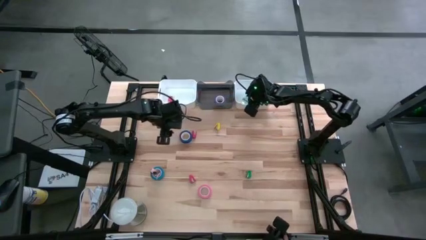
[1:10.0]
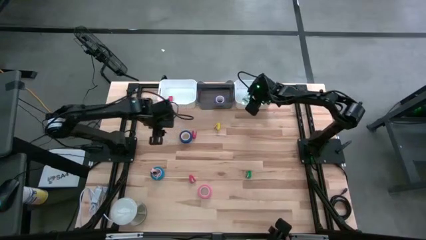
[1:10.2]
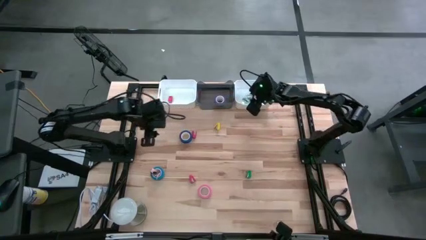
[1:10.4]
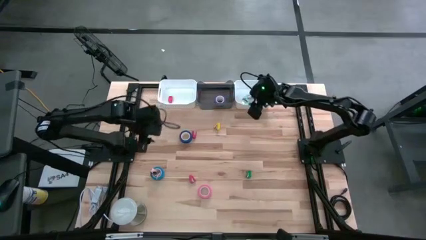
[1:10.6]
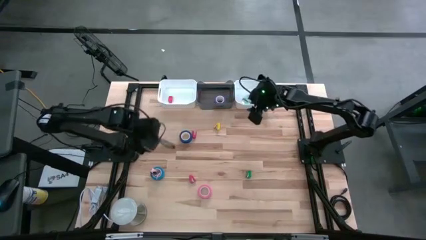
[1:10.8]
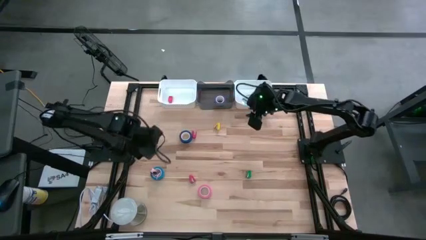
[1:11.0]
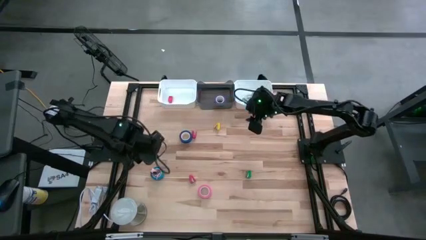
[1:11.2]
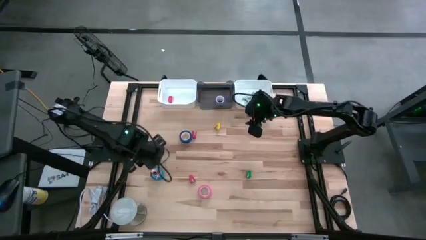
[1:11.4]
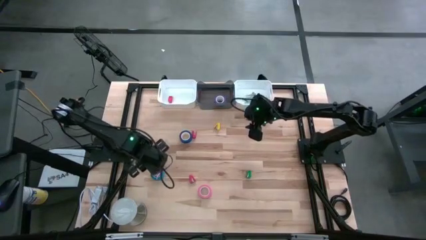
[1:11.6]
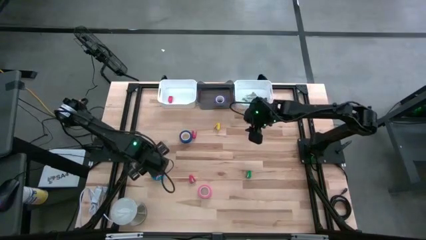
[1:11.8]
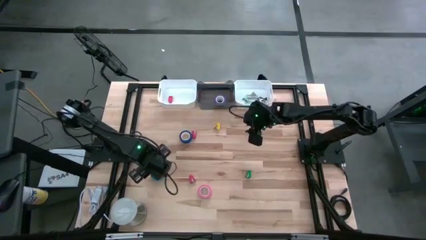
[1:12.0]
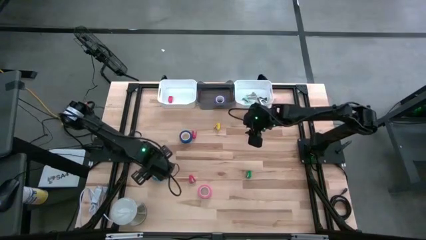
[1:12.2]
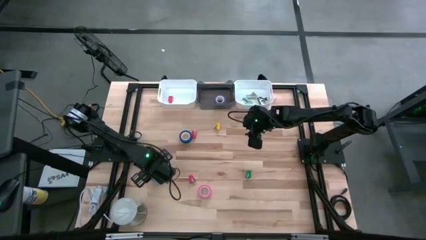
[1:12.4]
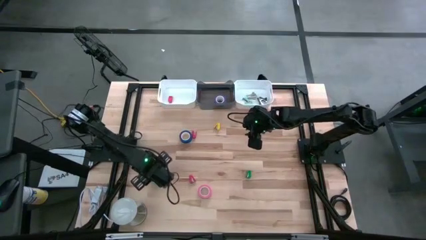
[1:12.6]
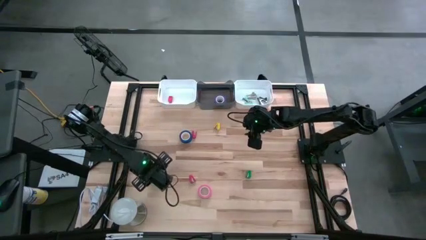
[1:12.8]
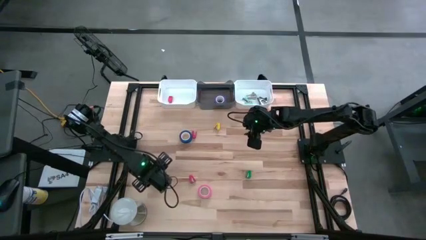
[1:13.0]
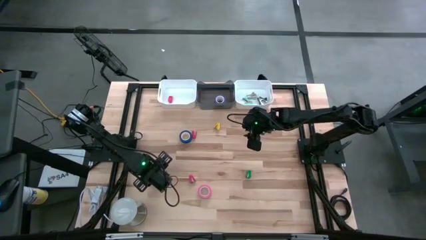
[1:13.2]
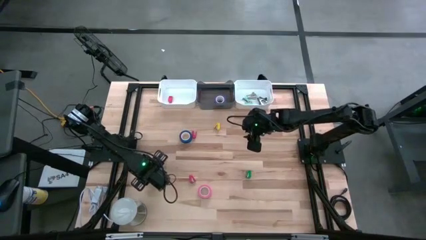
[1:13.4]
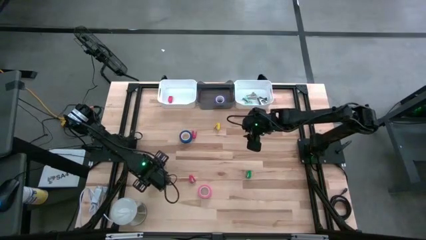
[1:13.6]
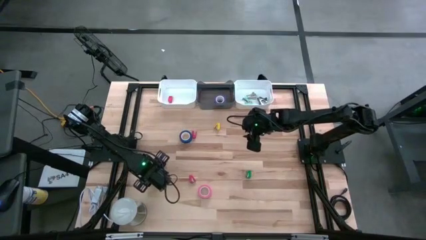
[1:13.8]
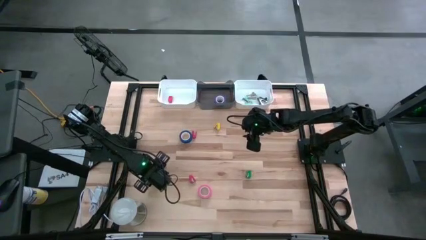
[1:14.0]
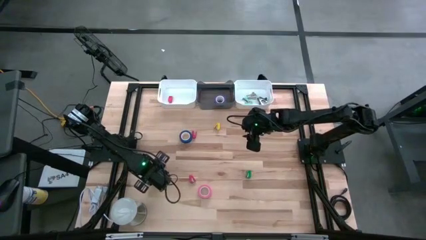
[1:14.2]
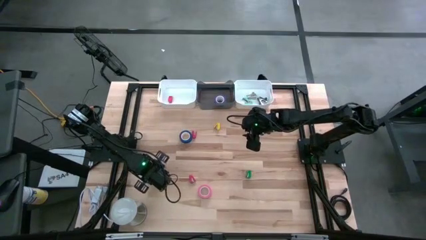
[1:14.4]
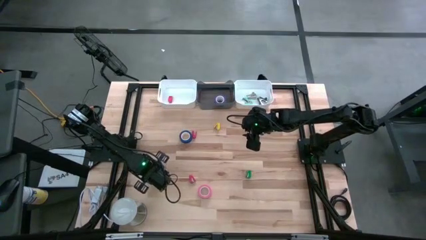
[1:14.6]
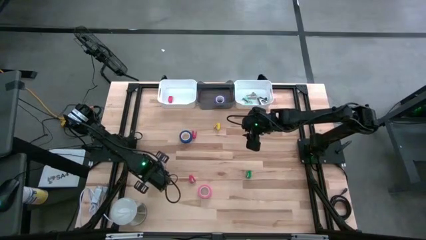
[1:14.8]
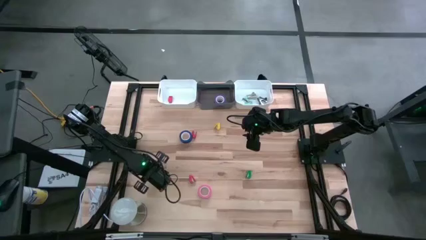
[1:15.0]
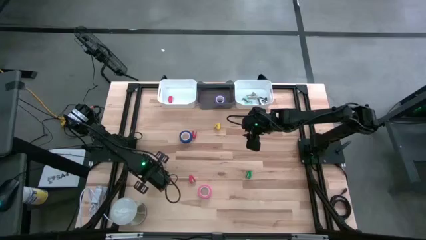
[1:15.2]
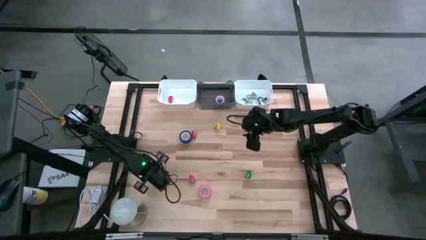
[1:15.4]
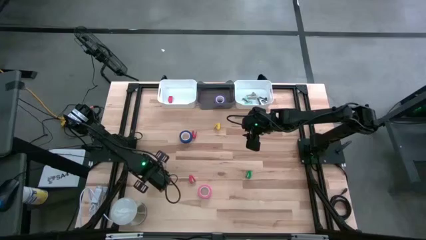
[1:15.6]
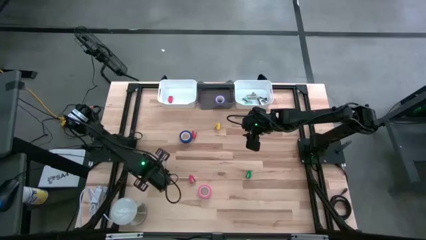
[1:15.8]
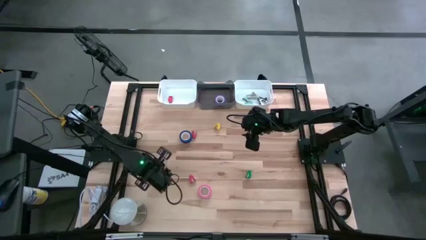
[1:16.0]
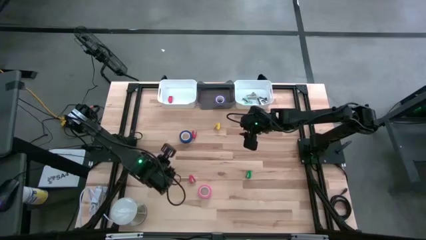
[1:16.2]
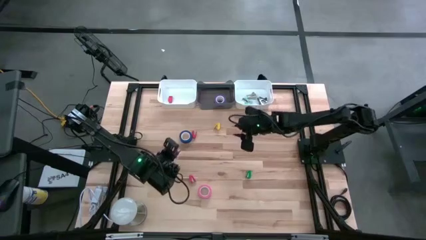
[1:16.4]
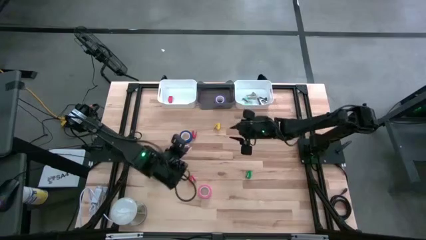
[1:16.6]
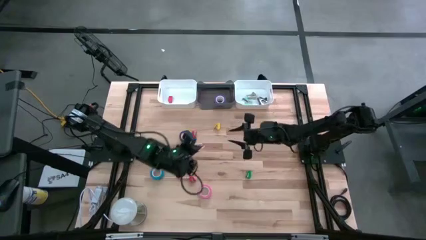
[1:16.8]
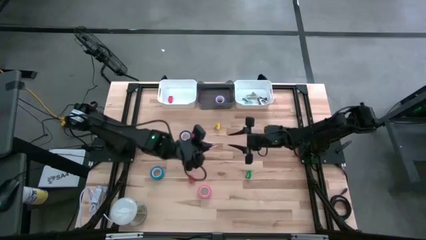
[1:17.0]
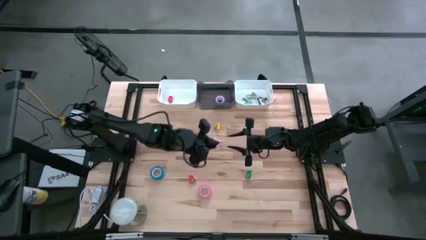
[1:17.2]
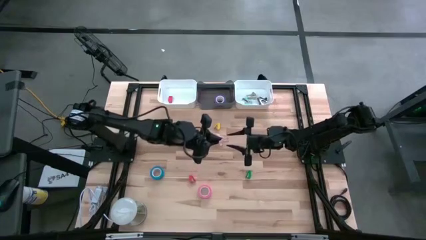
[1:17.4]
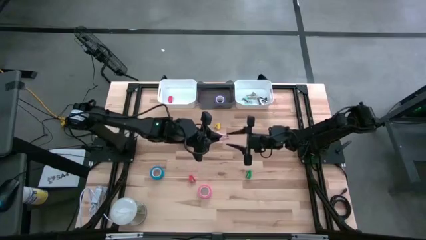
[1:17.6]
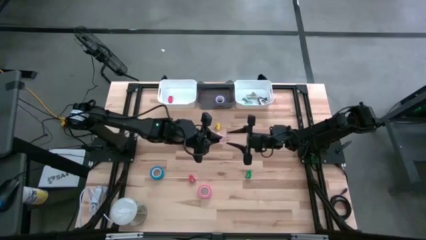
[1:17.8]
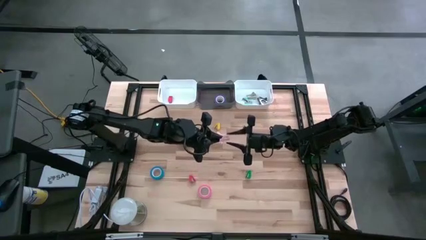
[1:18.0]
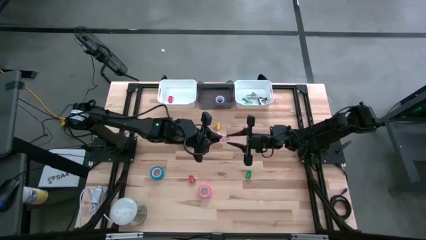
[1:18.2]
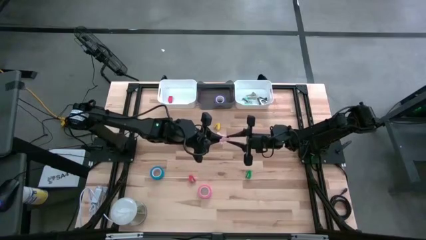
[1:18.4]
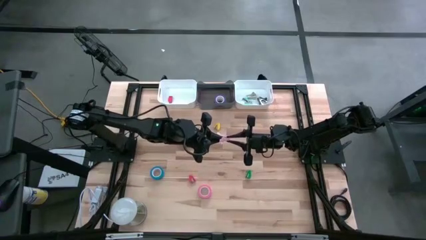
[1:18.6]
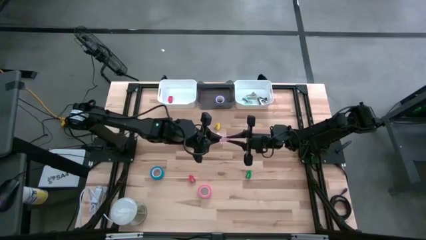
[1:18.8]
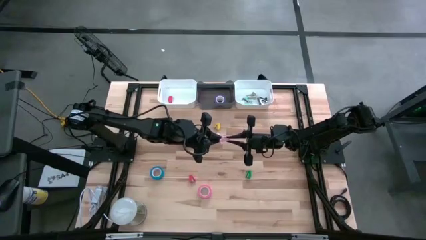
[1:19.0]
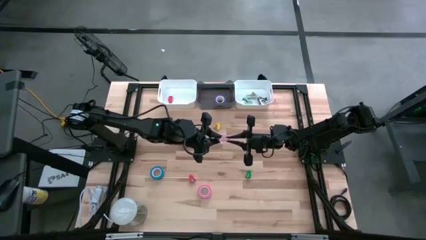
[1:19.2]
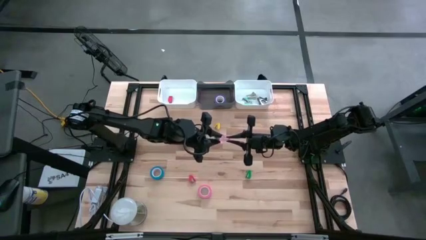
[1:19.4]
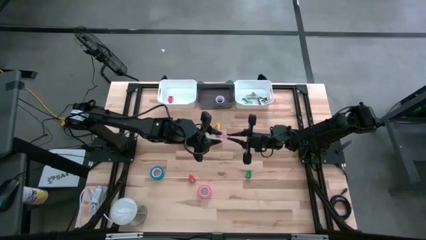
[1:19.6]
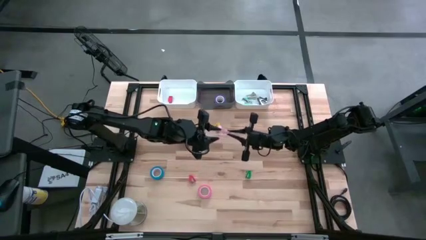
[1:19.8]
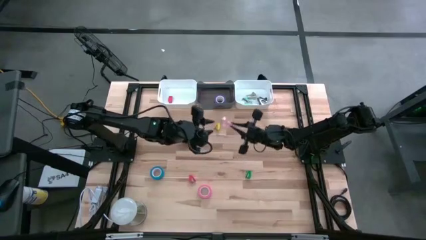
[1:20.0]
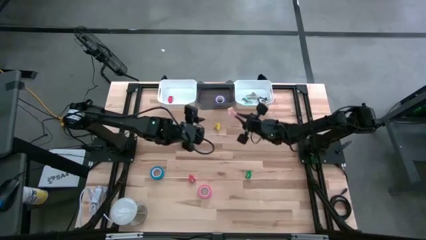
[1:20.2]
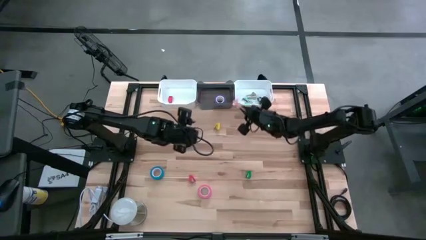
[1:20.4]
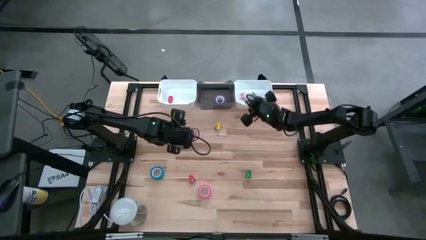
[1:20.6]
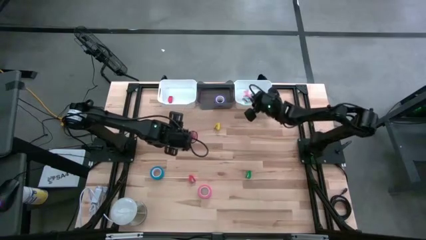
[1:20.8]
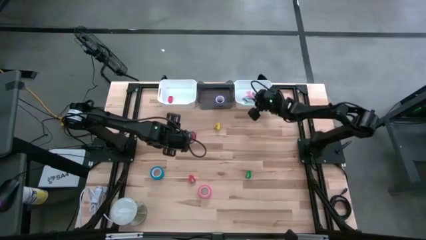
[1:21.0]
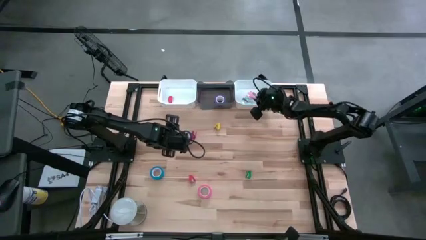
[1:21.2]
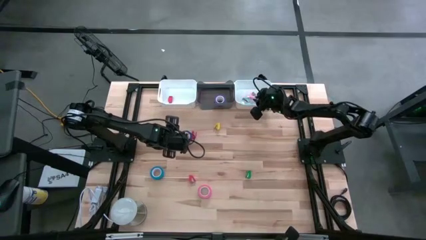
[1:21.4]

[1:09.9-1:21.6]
Task: Pick and place Stapler, Stapler remover, tape
Put the pink staple remover into the right white bin

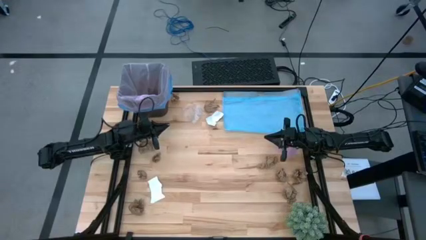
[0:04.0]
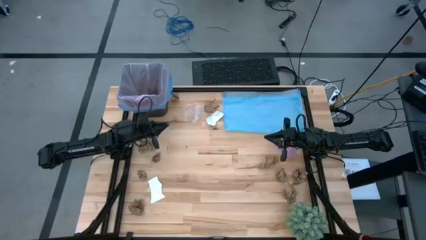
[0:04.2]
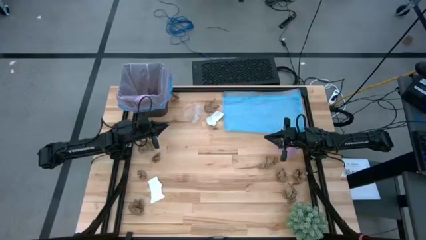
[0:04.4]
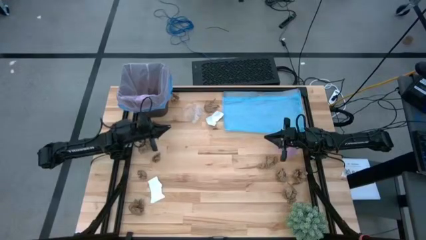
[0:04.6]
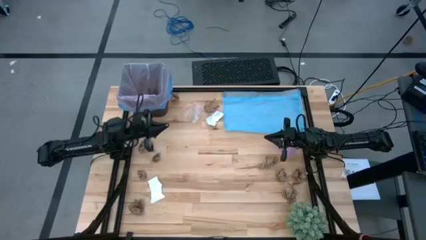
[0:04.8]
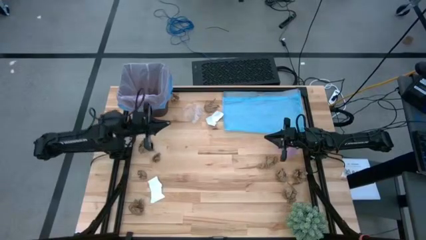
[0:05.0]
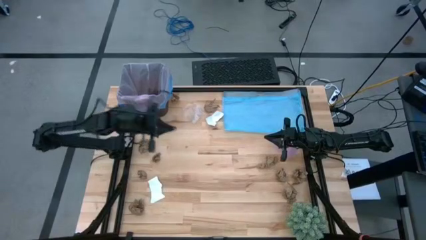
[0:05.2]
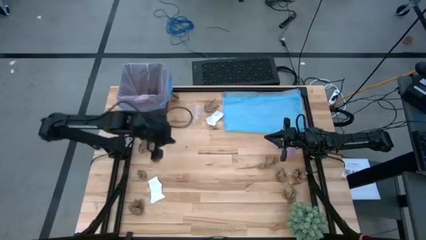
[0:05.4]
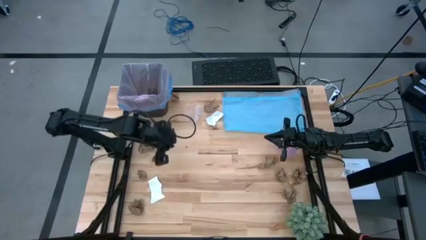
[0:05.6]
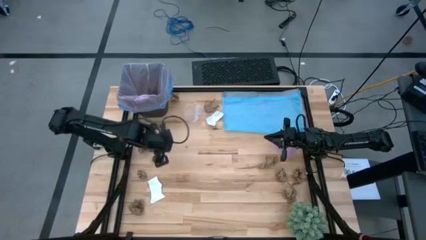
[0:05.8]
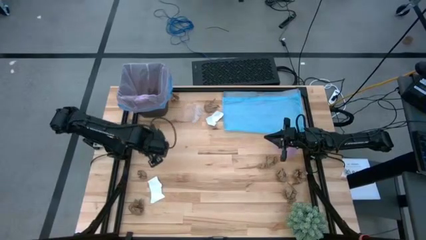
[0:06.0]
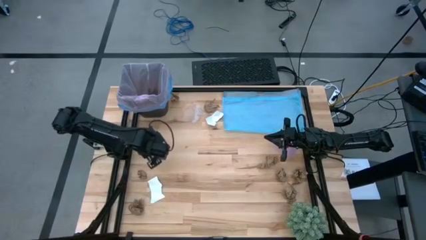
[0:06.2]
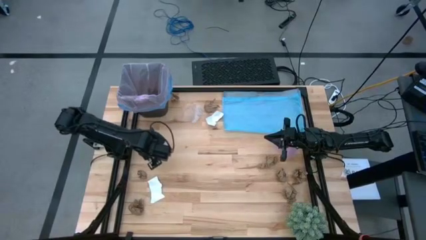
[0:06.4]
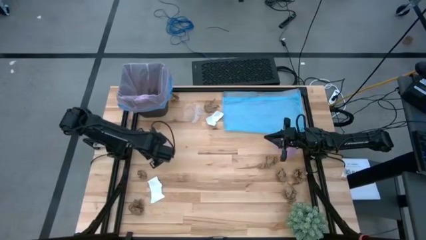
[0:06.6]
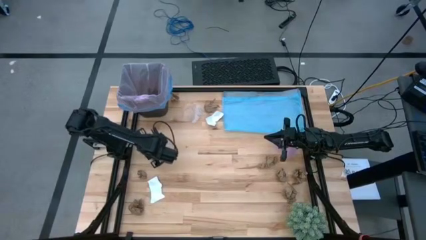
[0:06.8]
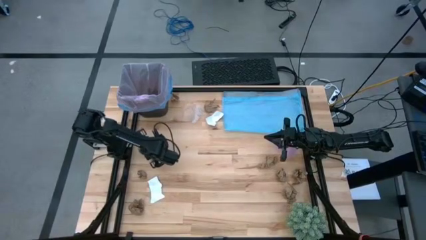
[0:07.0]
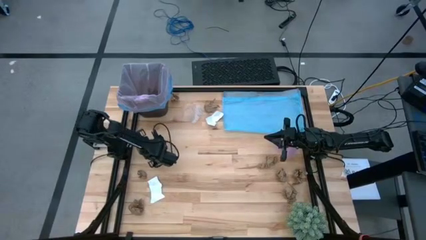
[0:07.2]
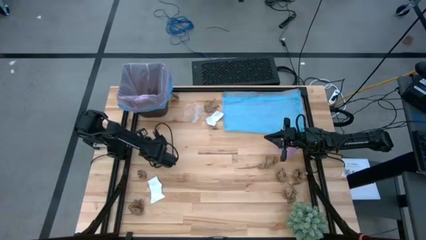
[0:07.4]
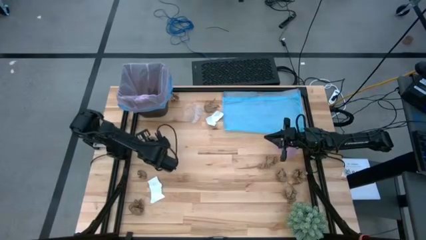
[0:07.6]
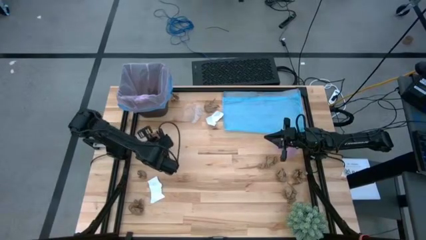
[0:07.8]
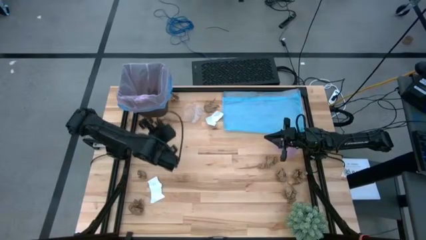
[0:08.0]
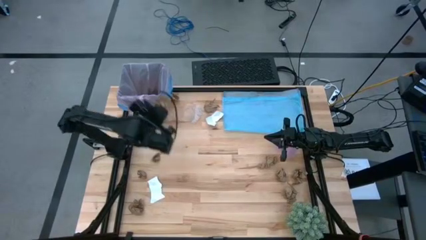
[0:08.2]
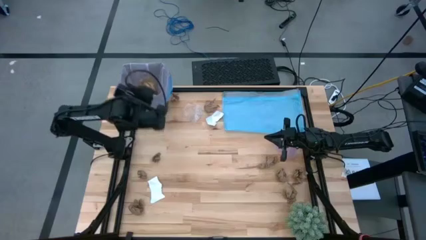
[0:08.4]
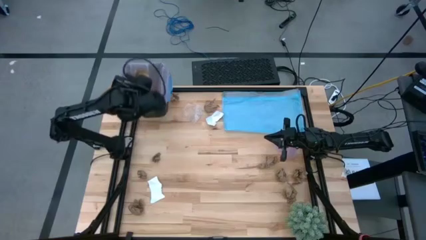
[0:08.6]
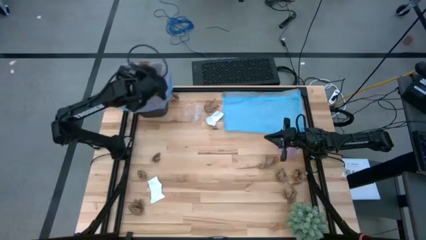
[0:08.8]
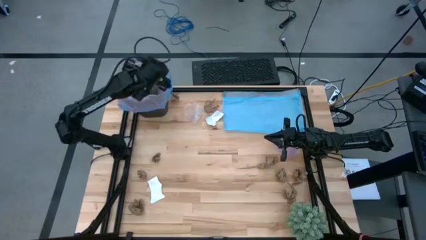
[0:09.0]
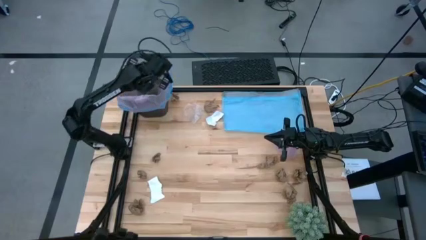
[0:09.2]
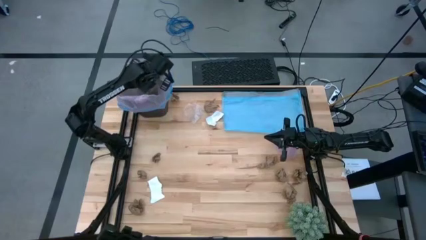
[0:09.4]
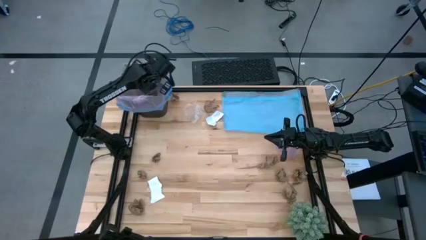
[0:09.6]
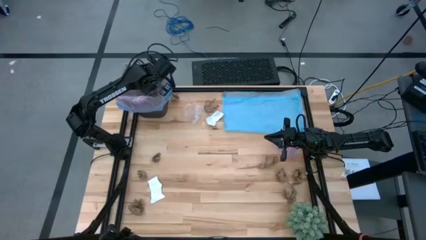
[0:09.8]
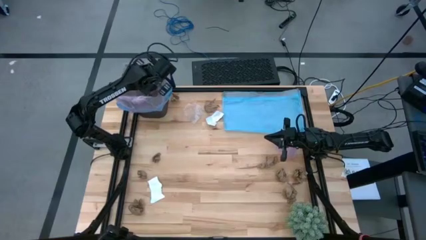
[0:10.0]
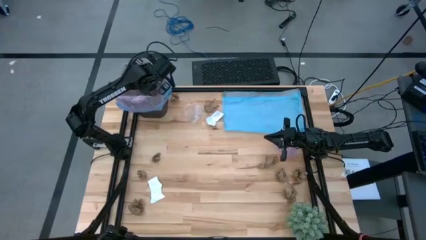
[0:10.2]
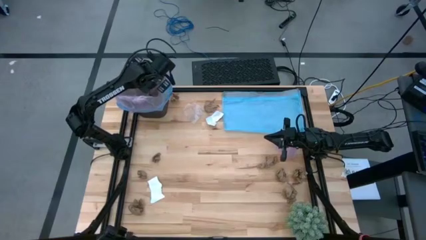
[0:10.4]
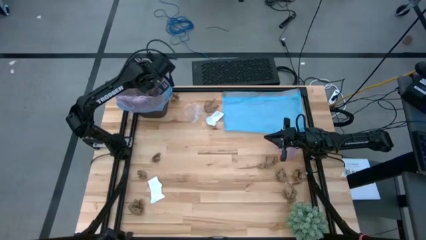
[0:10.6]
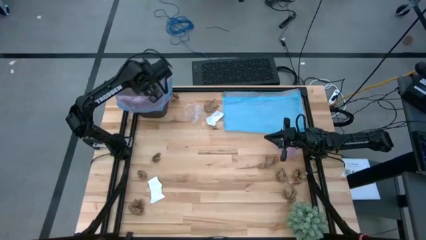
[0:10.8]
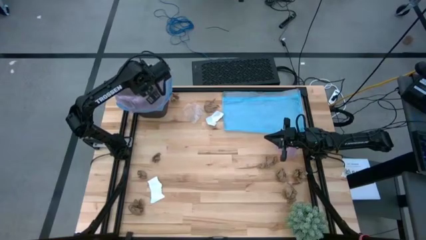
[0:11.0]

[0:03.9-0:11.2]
Task: place trash/remove bag and relplace
Put the brown napkin into the trash bin
